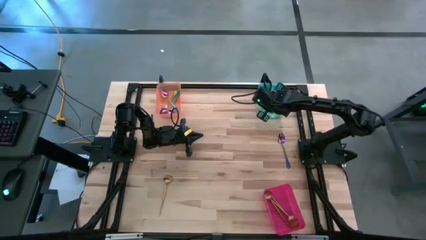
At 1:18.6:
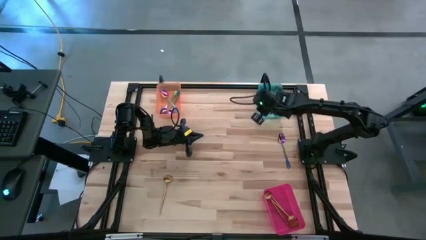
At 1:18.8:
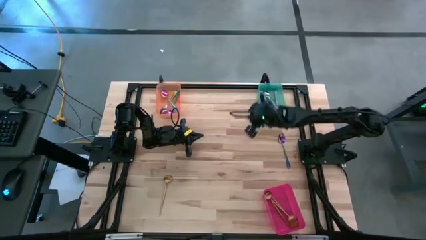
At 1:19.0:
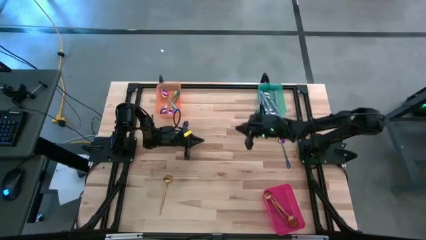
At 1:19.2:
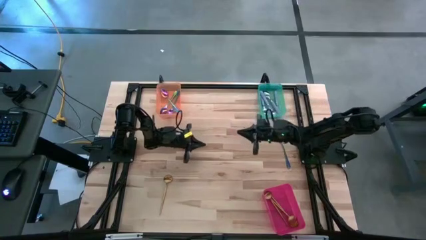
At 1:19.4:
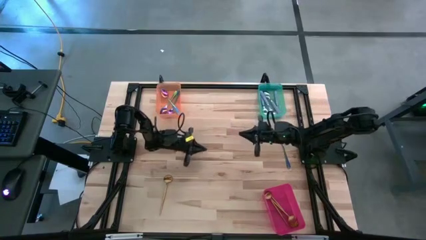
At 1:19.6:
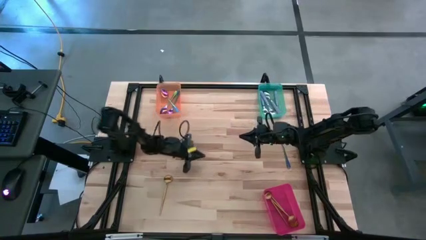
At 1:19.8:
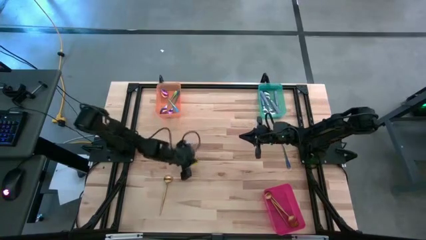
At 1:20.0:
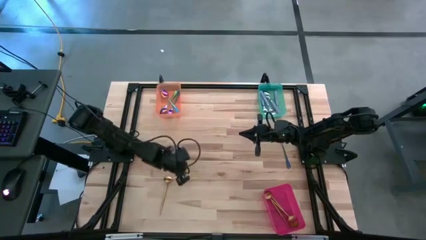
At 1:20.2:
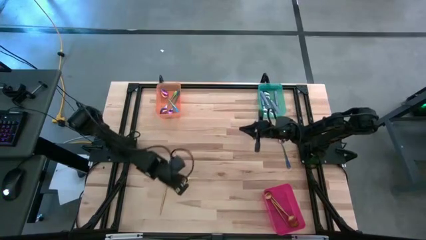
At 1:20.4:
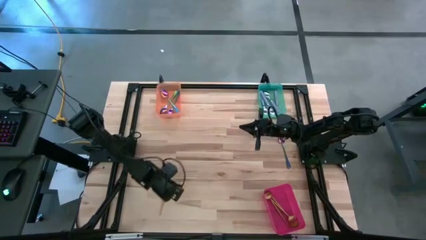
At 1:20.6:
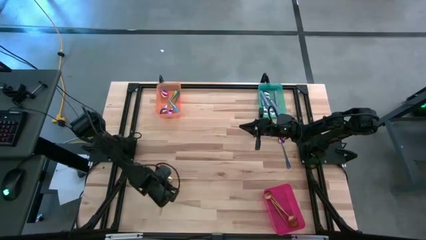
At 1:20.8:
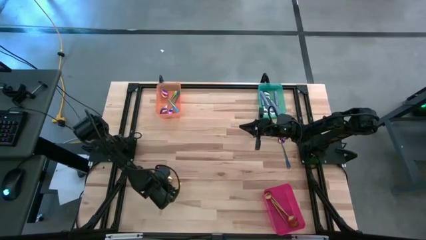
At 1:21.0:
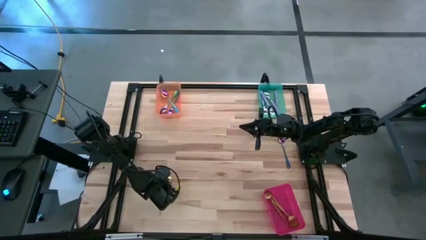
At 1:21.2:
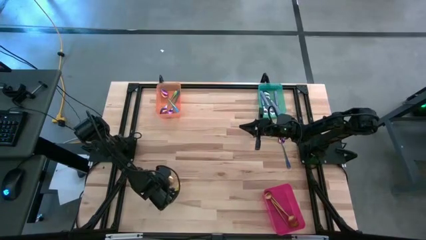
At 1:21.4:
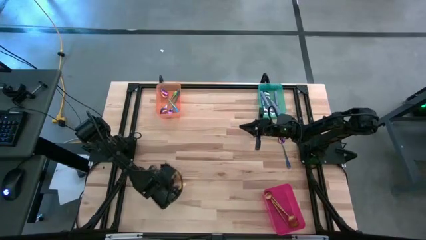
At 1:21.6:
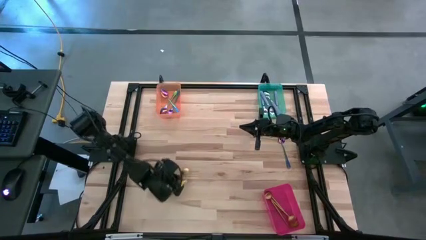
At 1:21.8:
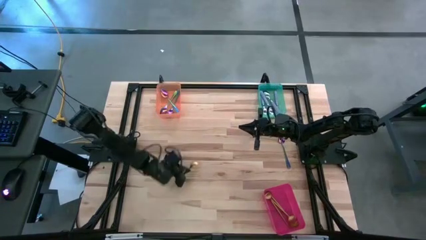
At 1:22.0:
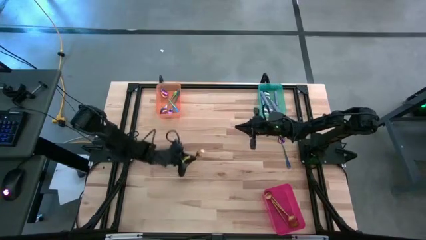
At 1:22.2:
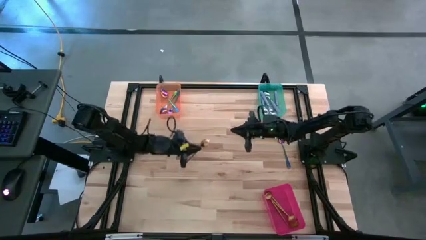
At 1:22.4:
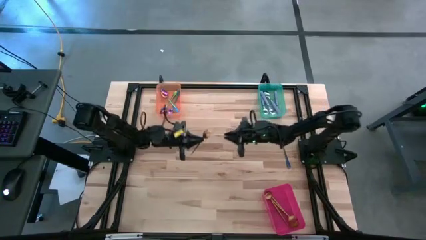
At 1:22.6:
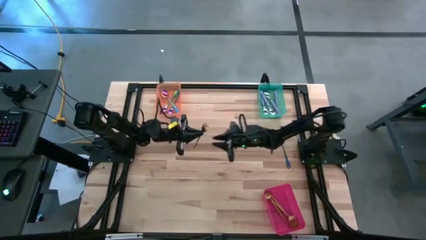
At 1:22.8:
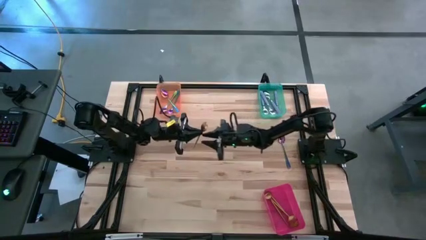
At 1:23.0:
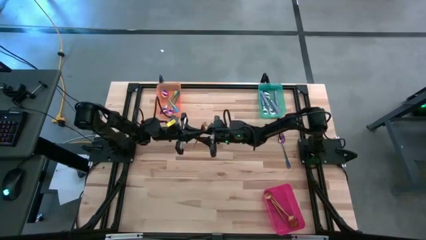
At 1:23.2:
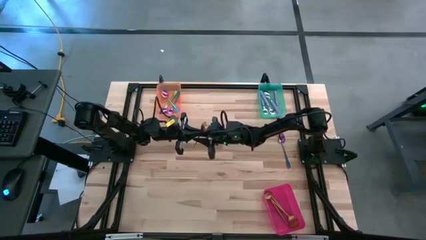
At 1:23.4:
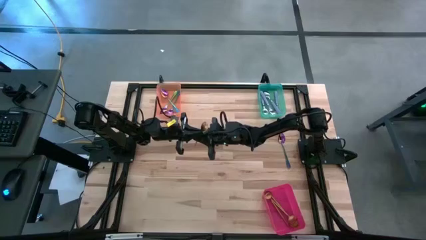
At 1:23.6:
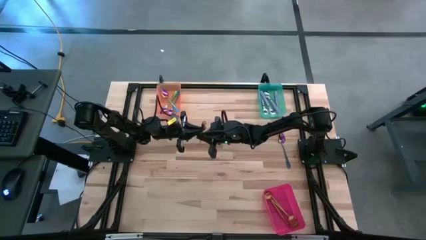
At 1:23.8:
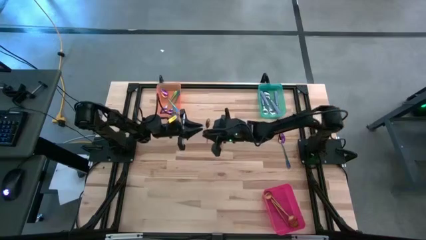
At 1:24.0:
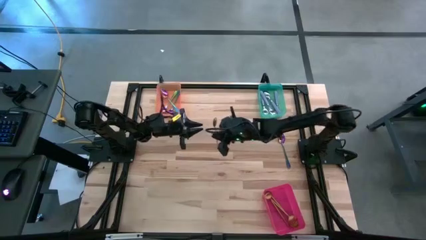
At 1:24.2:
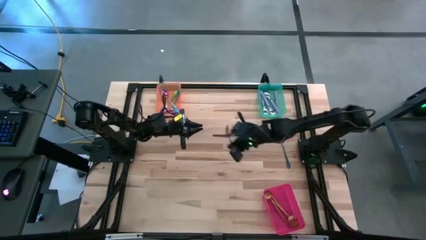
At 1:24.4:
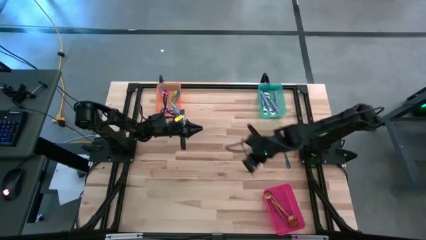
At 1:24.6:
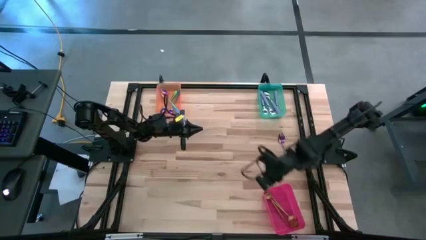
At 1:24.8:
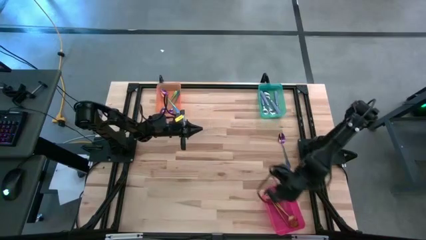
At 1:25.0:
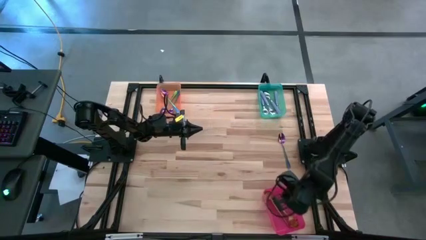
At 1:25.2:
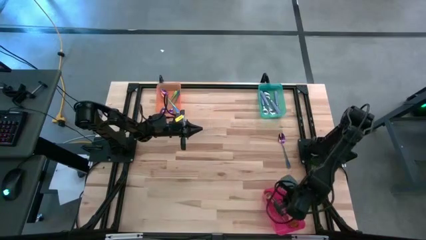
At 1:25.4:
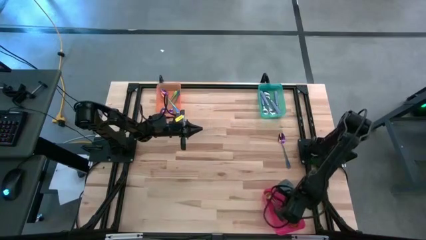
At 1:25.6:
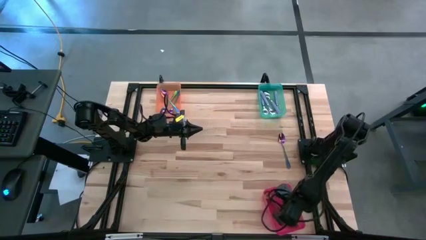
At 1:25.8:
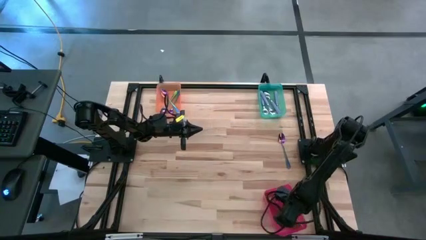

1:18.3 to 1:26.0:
Task: Sort silverware by color (type)
Put the gold spoon into the pink bin

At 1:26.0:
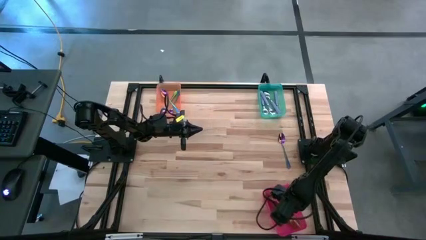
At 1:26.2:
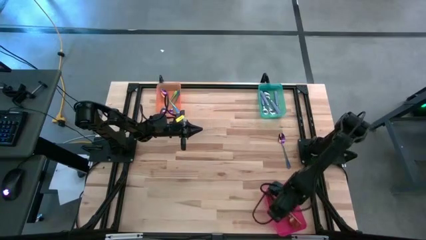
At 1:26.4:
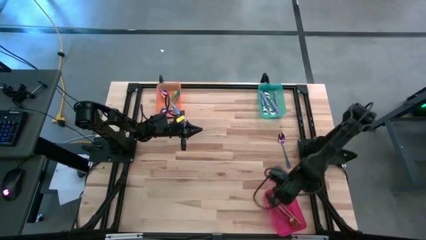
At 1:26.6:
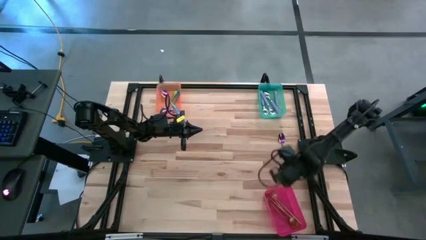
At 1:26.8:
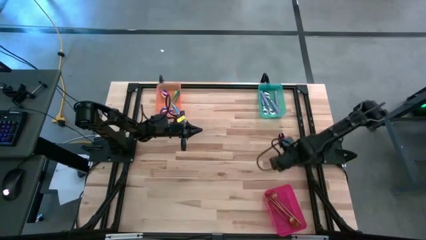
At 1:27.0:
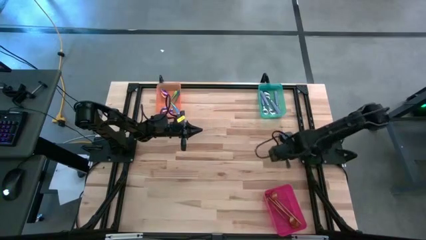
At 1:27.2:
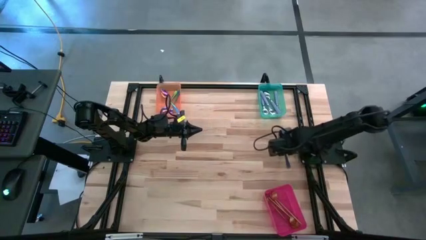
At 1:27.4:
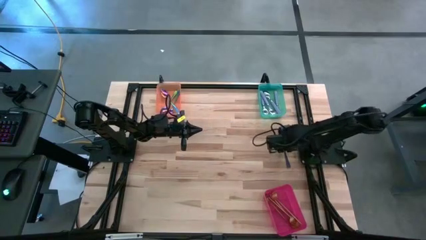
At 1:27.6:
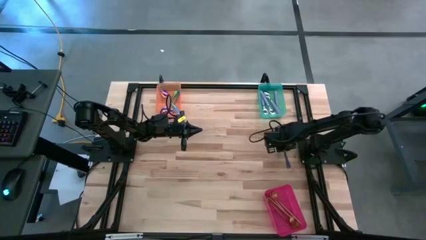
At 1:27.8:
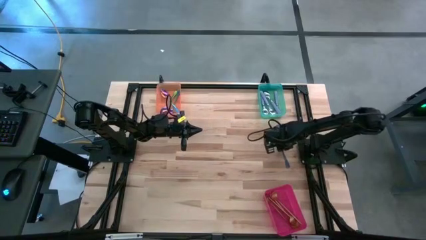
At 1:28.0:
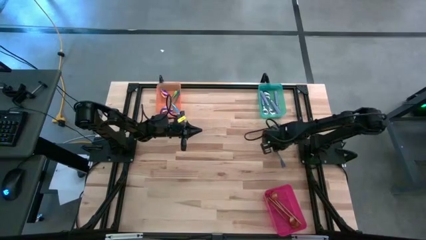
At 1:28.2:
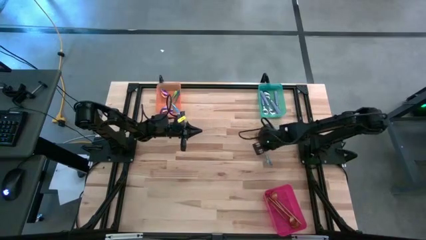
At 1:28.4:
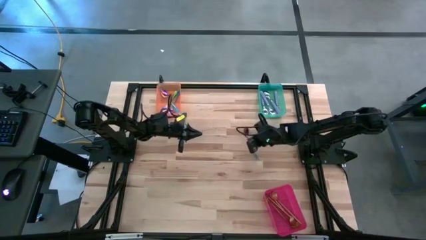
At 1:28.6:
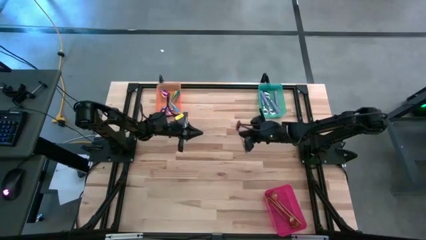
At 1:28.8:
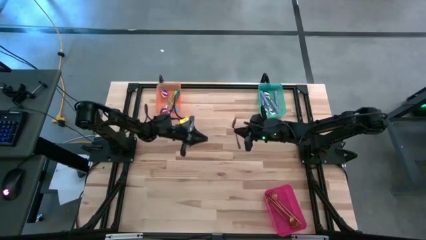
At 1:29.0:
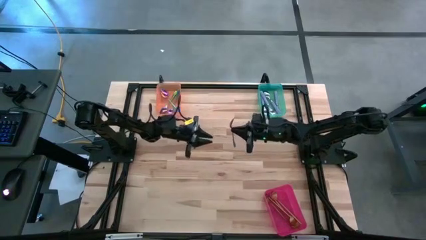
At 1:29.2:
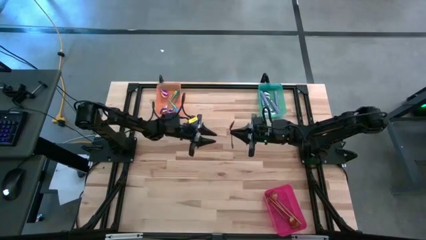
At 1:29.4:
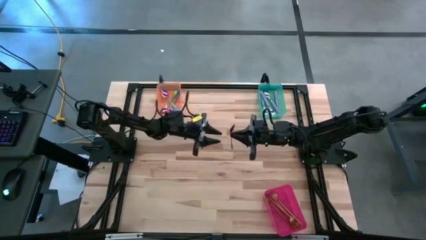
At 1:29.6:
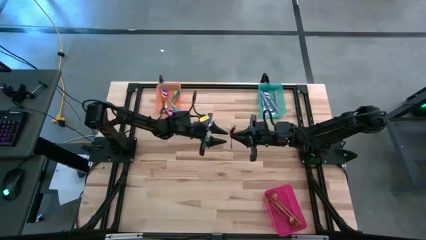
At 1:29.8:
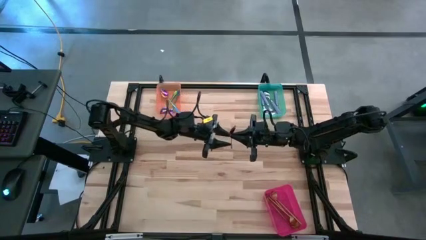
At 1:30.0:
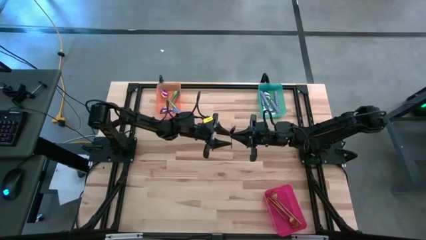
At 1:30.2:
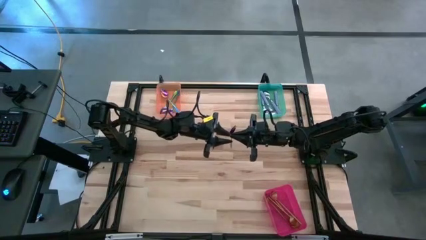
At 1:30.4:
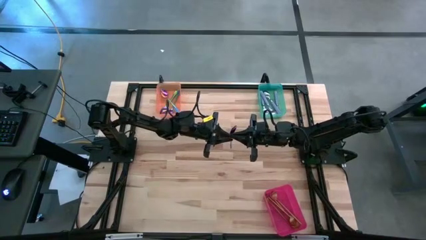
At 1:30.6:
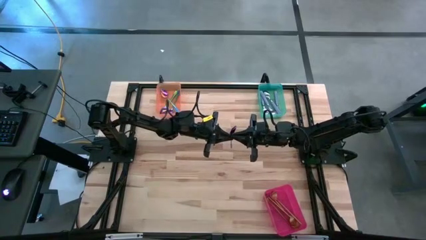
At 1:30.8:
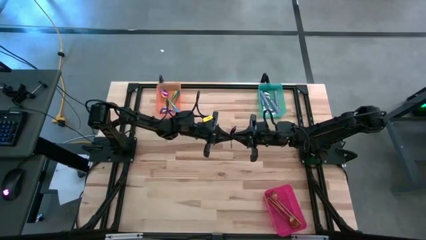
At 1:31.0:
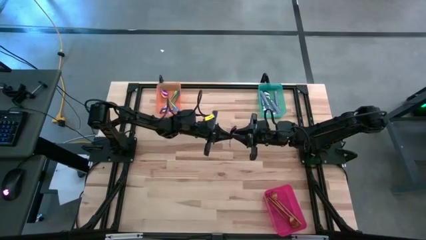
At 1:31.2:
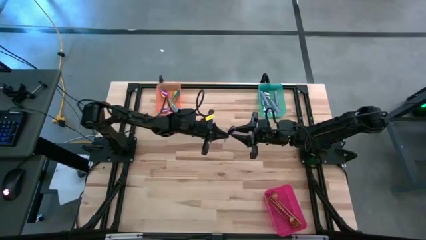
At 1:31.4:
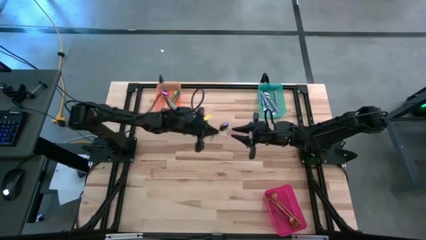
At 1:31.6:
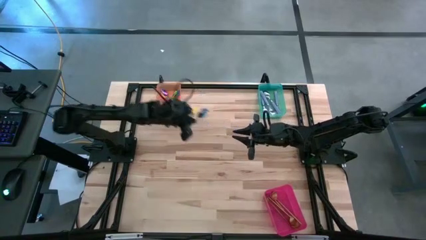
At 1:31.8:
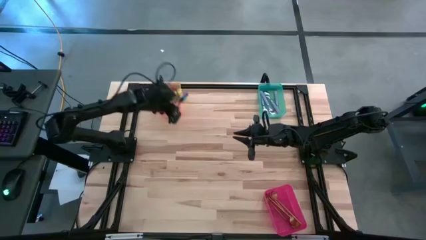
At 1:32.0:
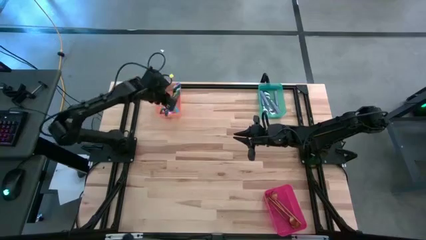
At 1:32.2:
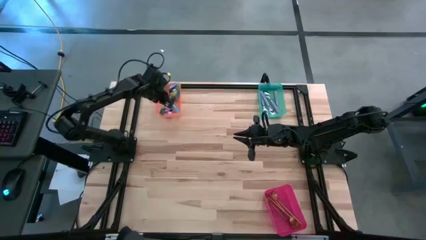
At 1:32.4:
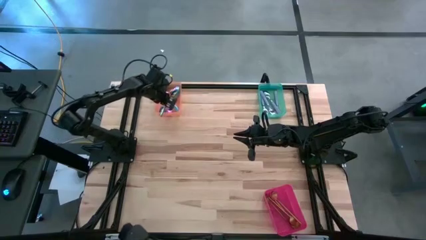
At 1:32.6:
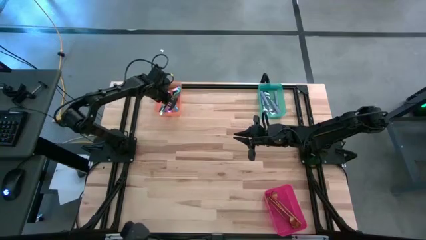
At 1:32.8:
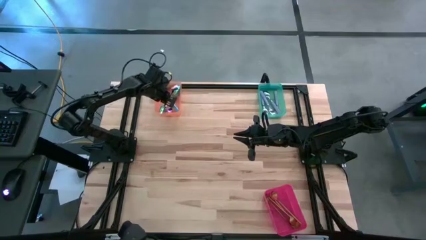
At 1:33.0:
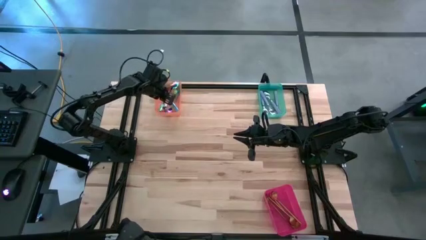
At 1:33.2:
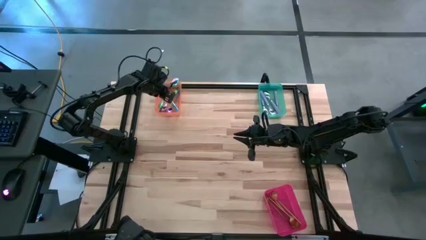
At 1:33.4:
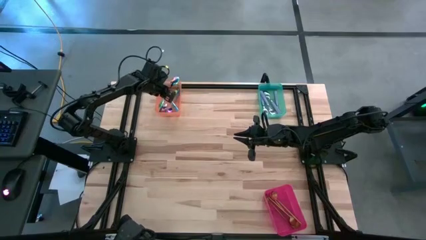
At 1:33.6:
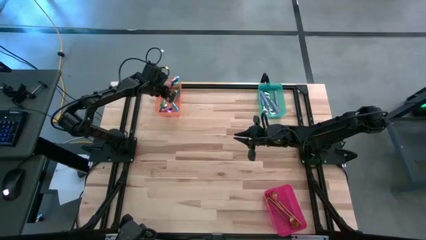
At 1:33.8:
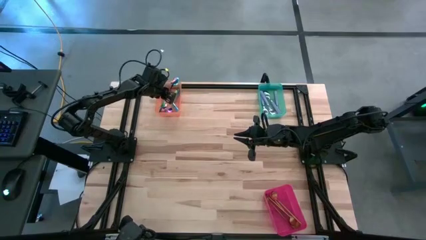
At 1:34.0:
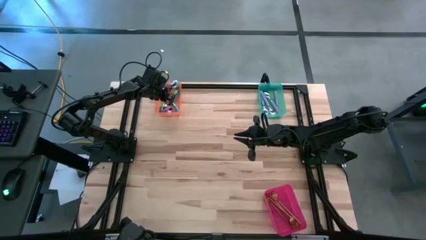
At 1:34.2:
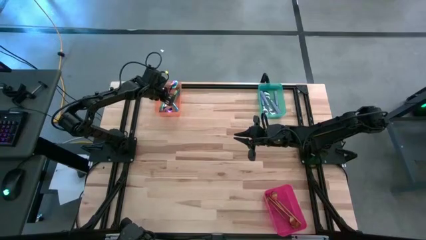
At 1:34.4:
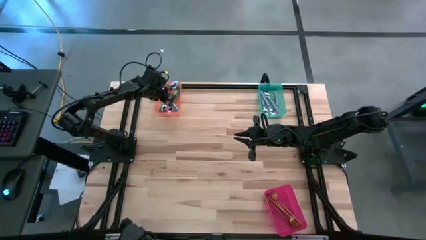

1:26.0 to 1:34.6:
Put the blue spoon into the orange bin

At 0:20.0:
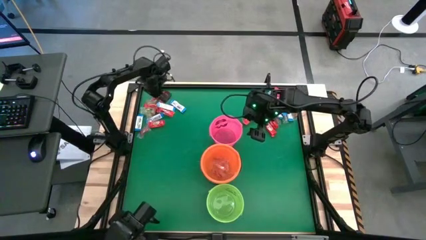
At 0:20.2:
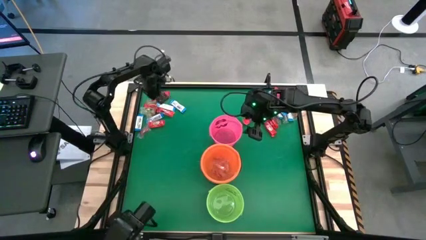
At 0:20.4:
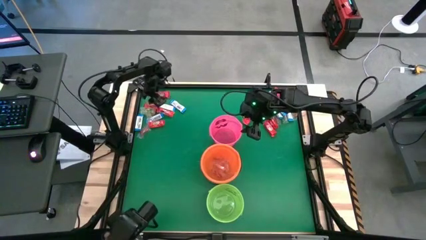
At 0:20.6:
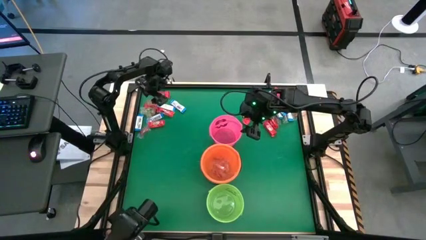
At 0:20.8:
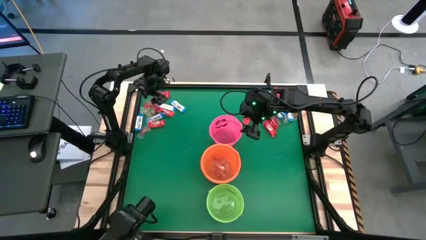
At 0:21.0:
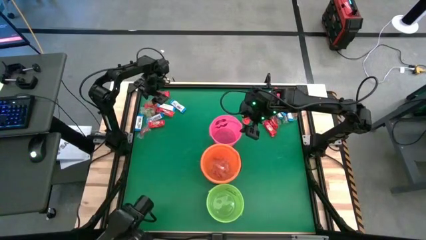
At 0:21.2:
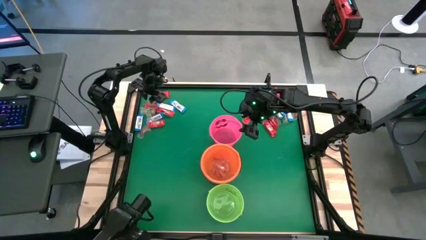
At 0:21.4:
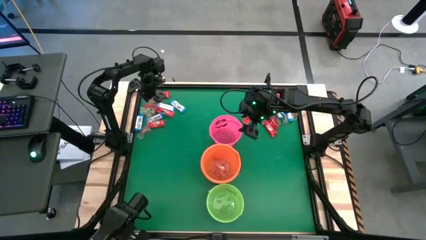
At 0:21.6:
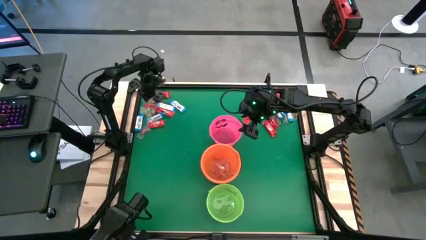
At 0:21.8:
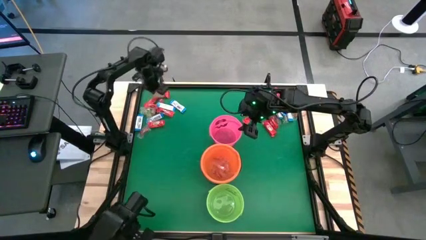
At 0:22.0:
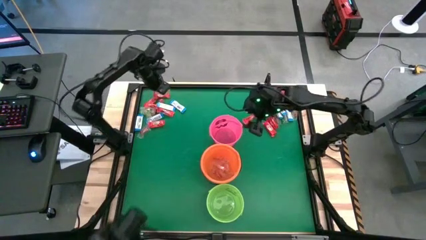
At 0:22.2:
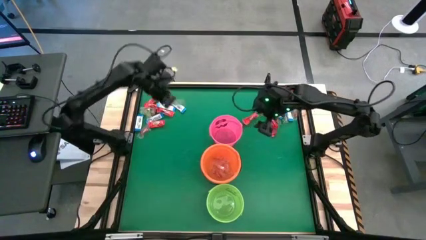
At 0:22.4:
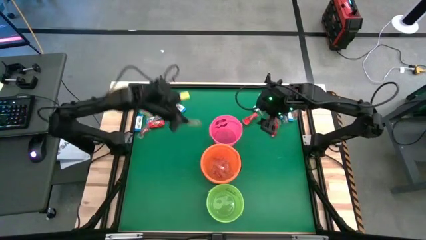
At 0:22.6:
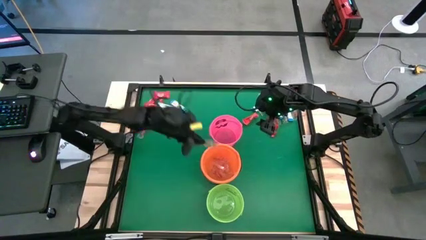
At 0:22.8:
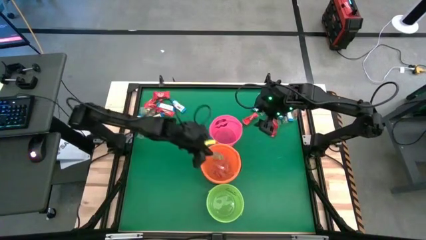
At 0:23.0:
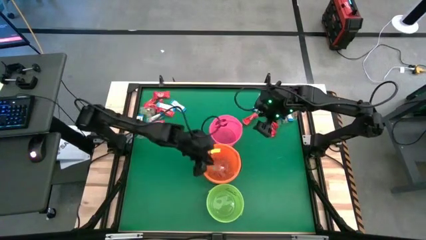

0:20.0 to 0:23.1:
Task: Sort candy by brand, put in halloween buckets
Put the green gummy into the orange bucket
